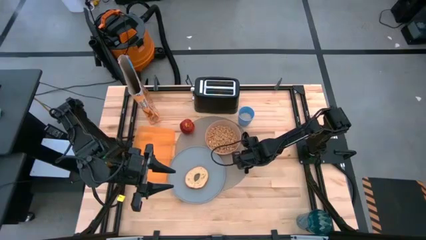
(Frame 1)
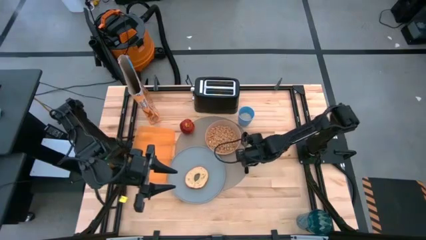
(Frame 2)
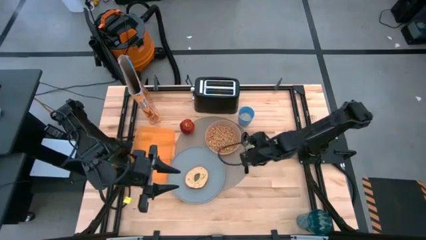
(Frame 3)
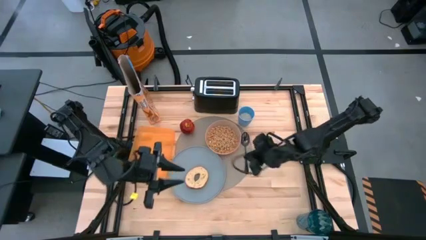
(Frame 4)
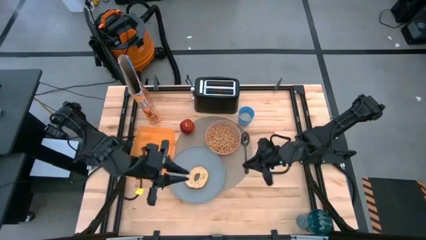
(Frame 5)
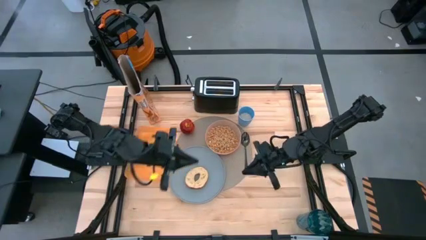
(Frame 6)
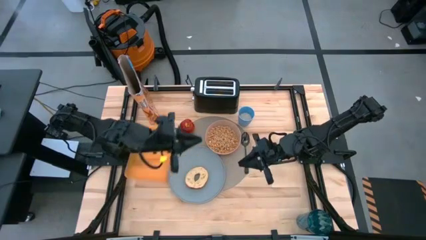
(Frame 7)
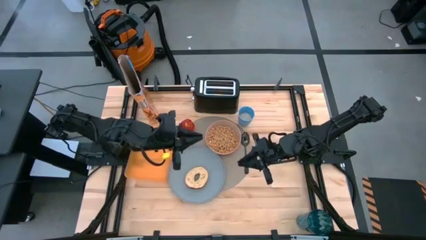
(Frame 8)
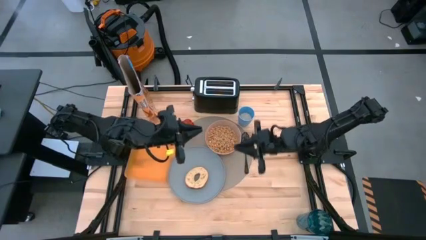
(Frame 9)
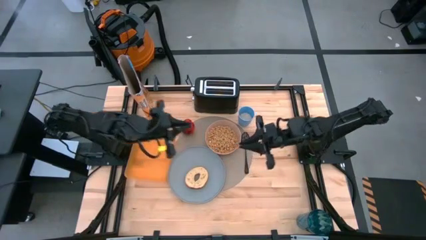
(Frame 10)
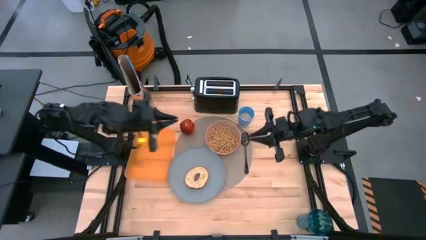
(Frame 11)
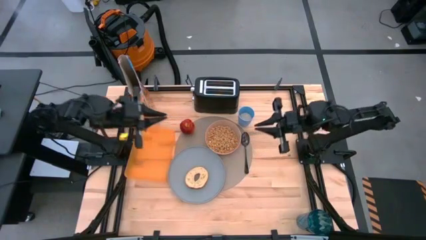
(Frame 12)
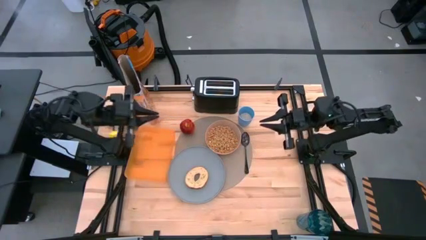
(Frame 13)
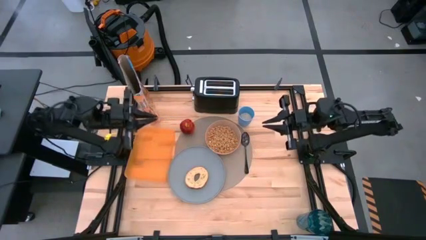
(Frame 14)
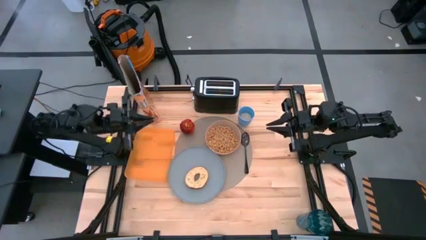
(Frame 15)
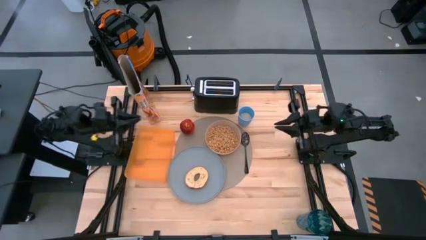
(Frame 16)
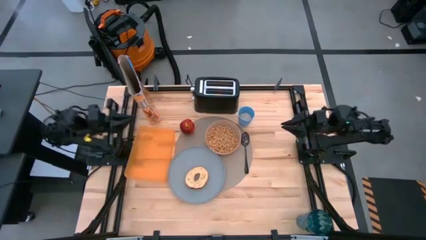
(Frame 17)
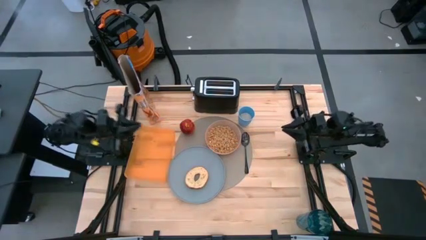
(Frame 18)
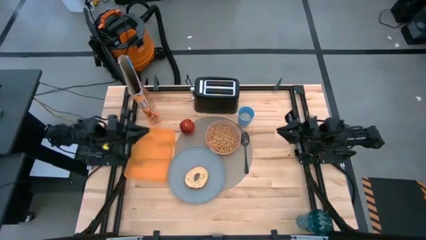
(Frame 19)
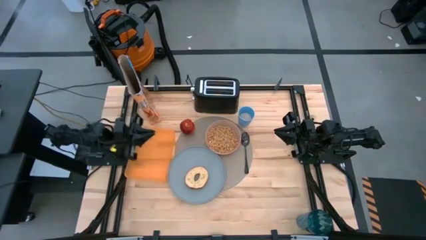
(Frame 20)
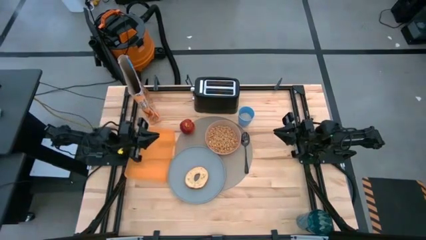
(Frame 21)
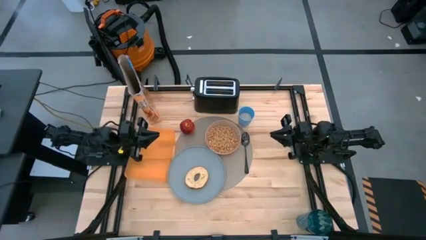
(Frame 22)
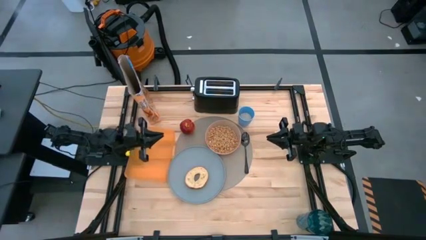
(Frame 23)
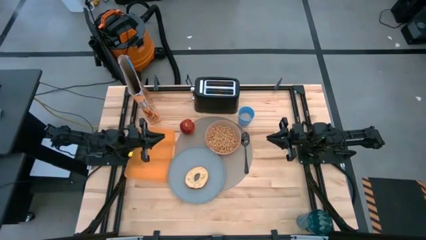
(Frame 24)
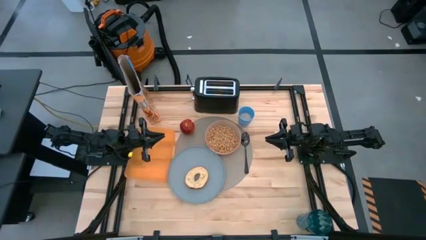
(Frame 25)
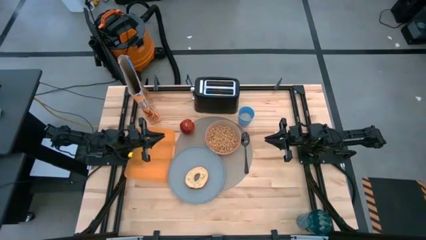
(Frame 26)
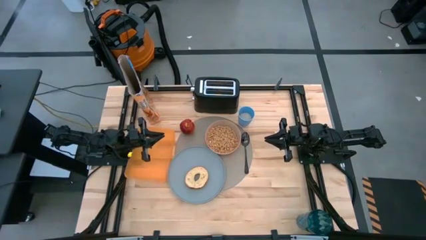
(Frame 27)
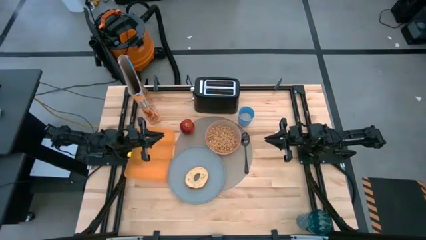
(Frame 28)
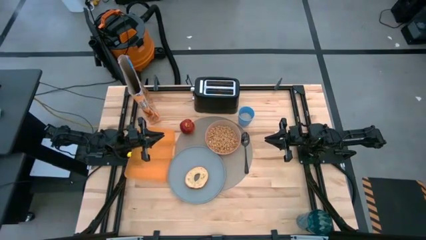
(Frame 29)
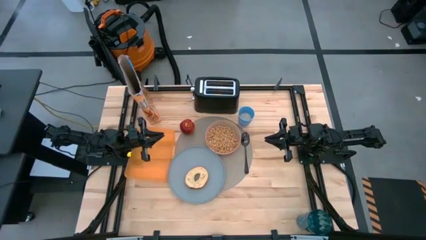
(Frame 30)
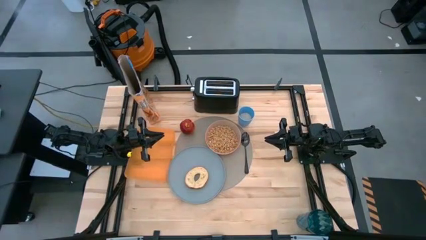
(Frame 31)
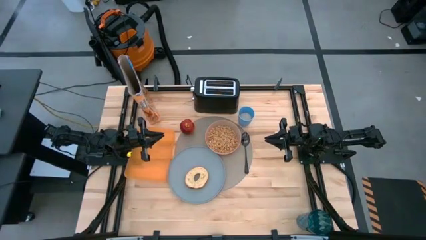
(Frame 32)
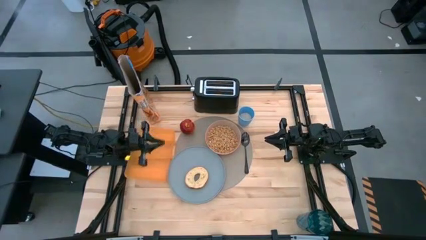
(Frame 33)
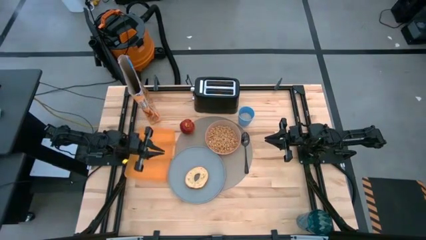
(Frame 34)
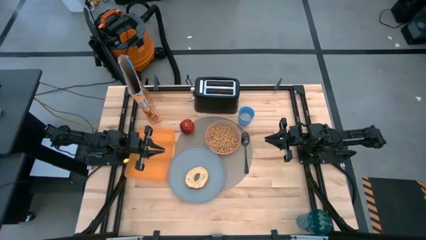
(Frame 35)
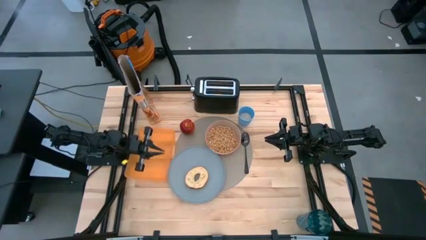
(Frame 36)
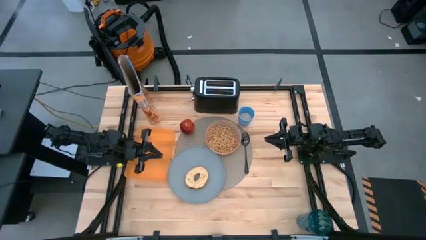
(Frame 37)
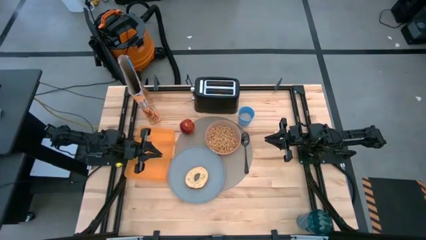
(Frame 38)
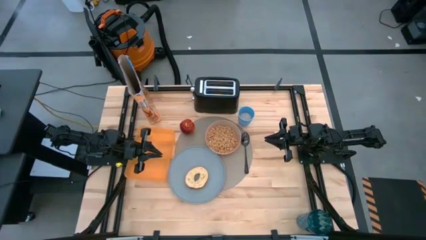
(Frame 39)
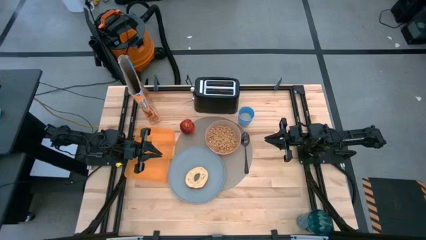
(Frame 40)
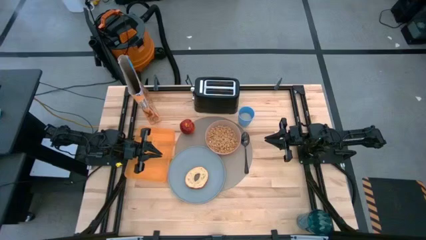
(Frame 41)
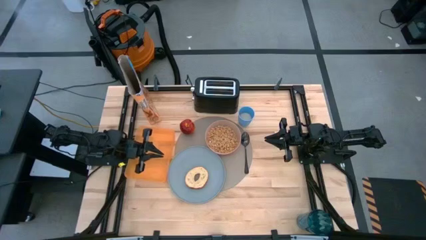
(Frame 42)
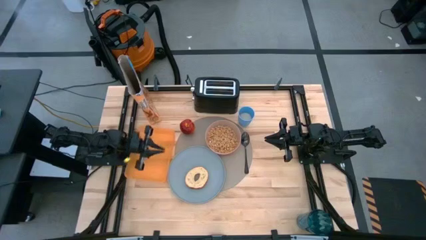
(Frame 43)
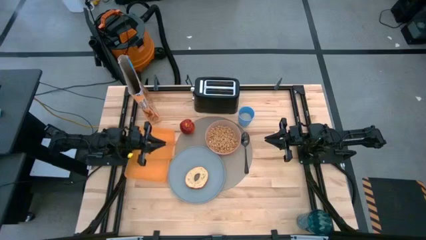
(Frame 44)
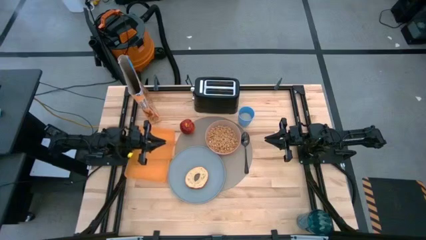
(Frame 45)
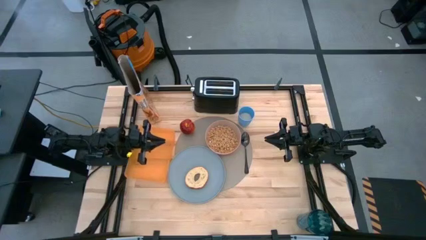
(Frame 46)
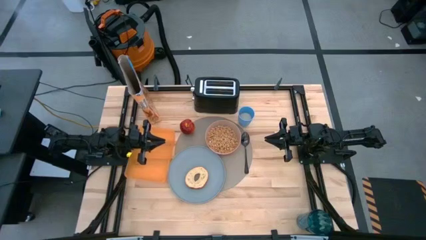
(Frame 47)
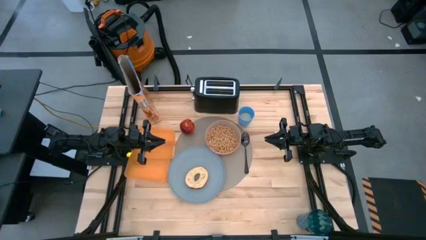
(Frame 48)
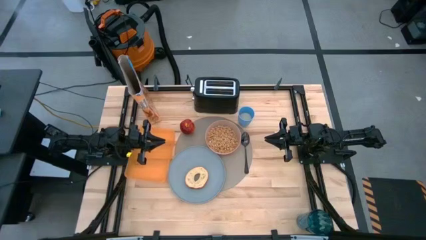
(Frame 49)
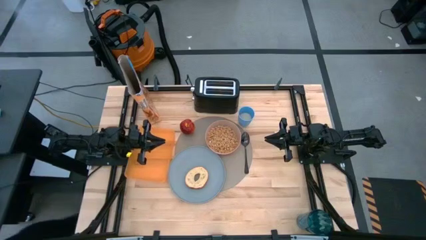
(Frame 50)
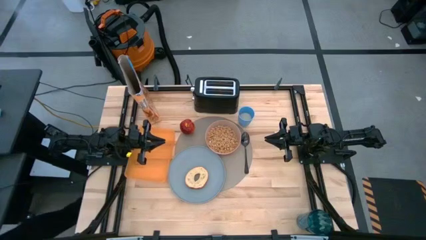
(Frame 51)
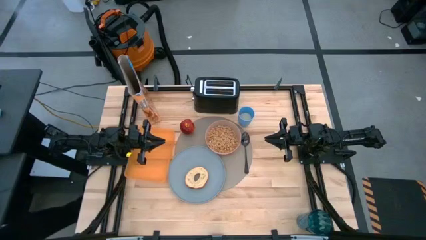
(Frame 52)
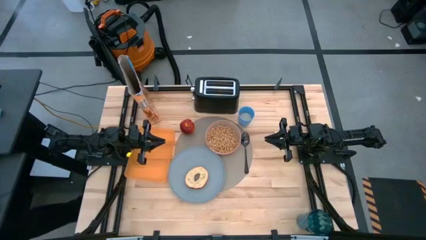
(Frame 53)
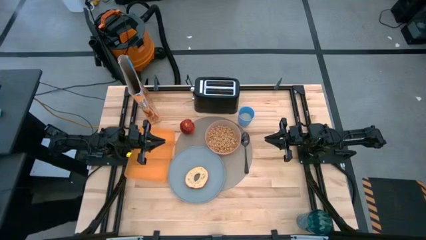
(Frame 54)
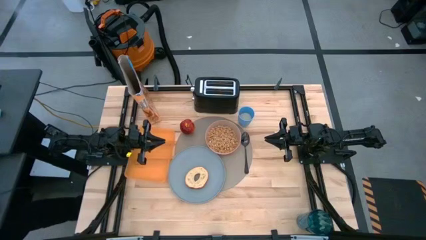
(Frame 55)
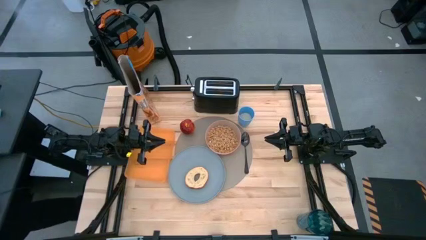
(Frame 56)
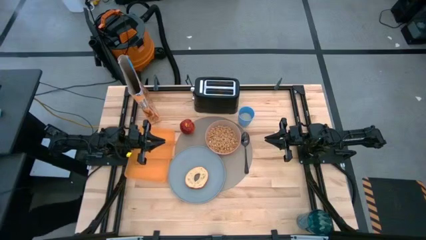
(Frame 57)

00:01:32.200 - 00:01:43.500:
Task: Arrange a breakfast setting
Return to Home Position
